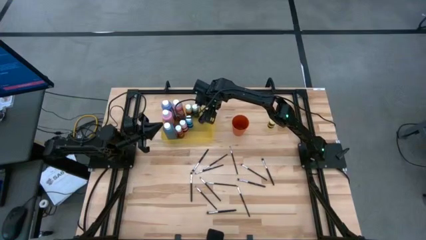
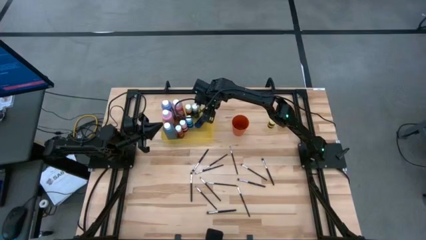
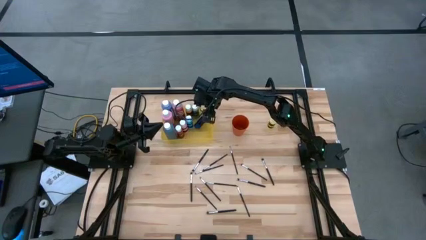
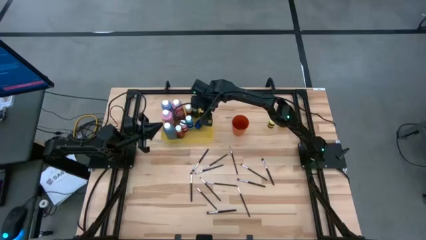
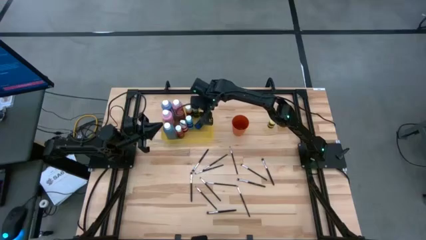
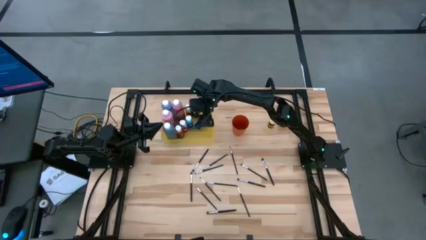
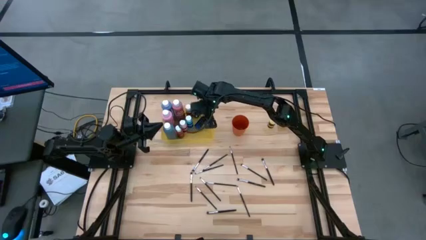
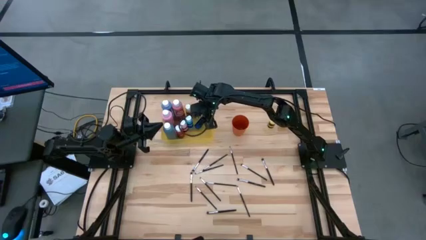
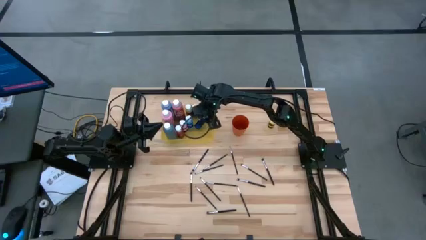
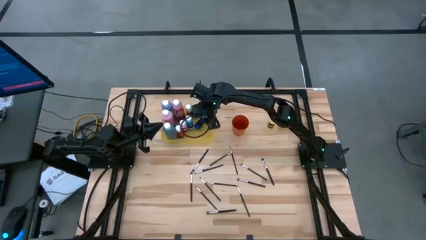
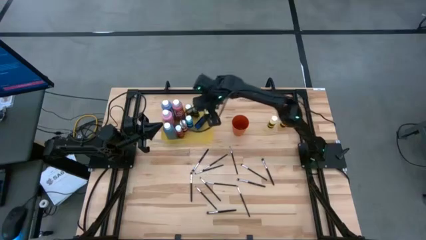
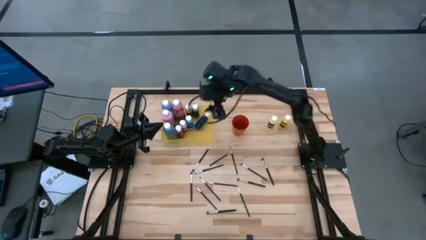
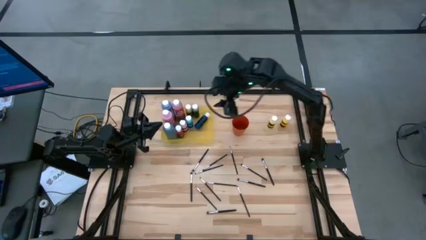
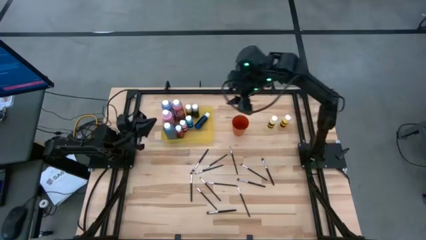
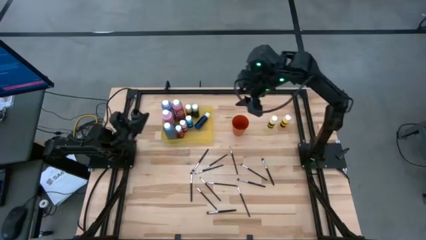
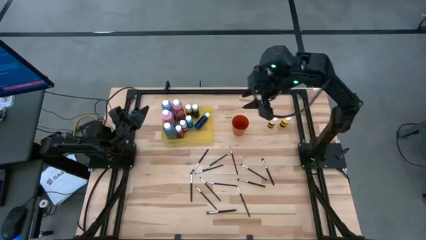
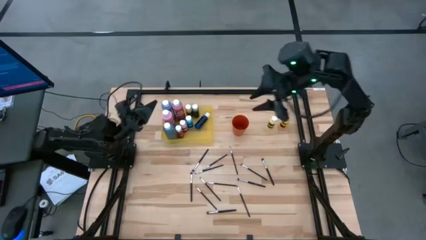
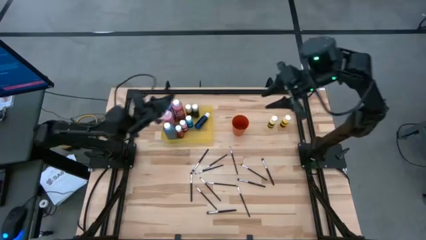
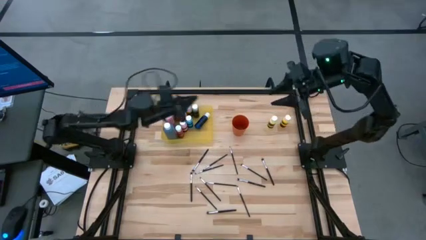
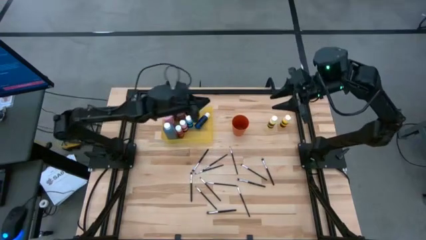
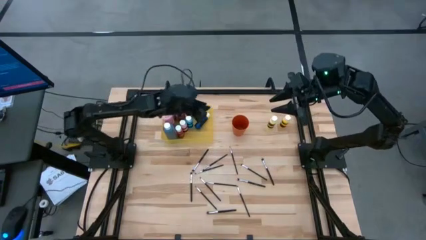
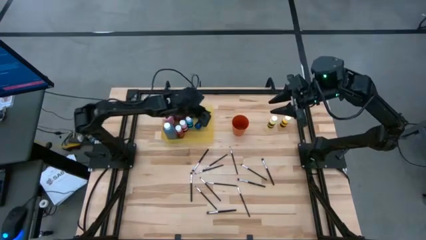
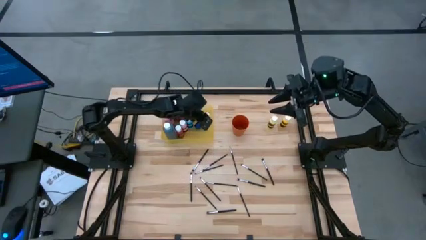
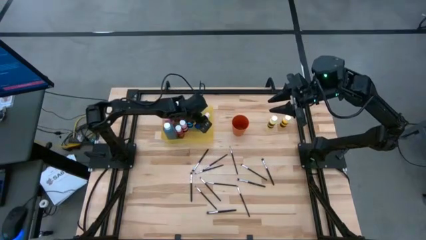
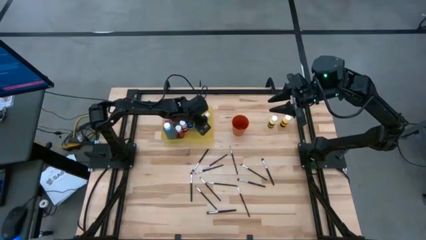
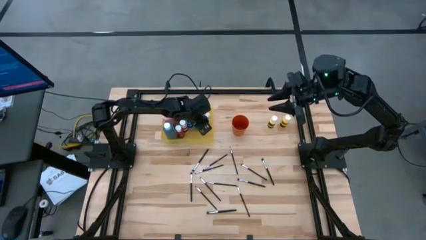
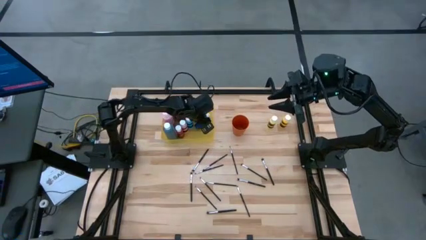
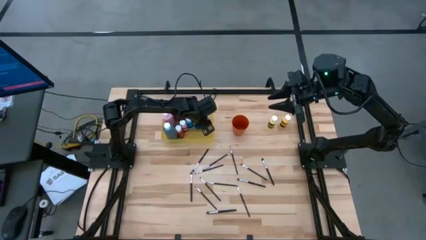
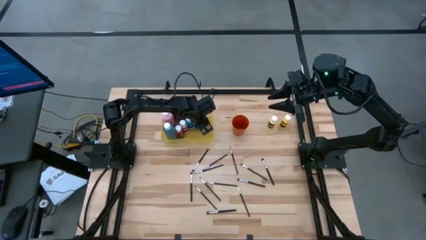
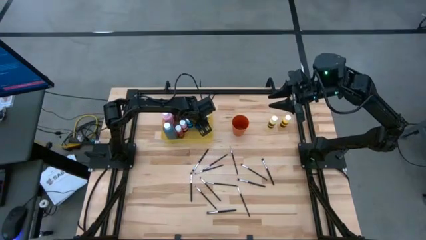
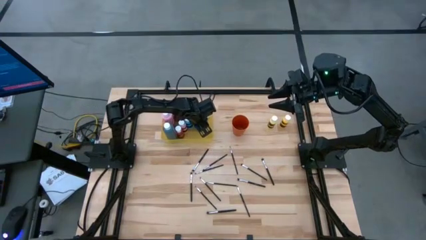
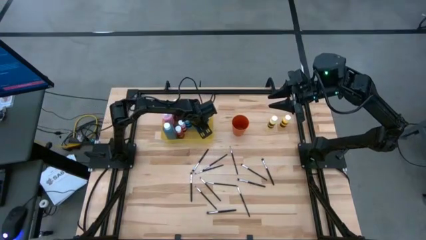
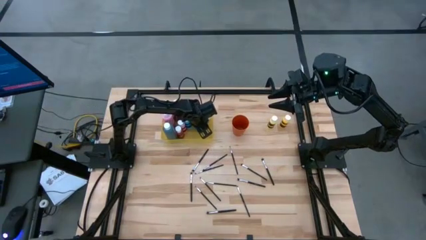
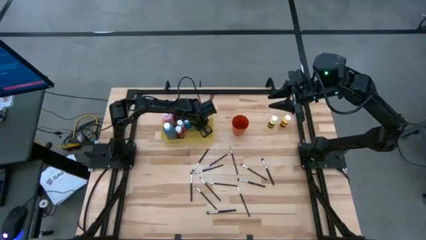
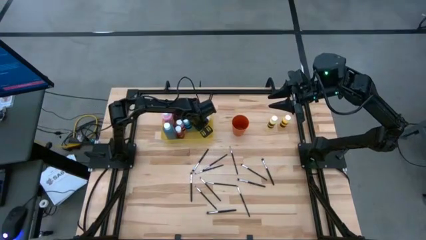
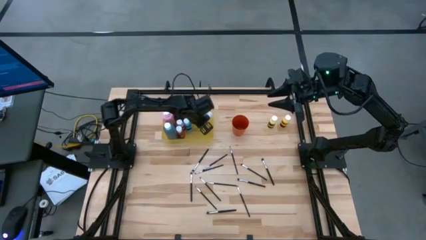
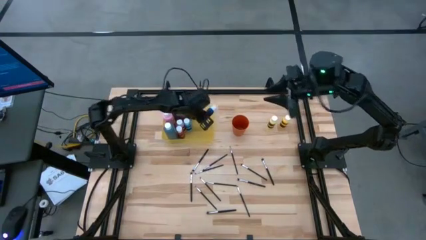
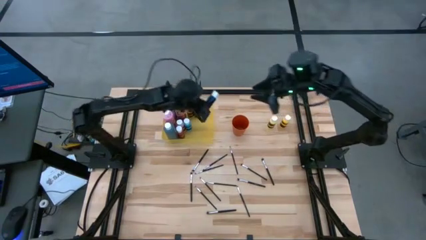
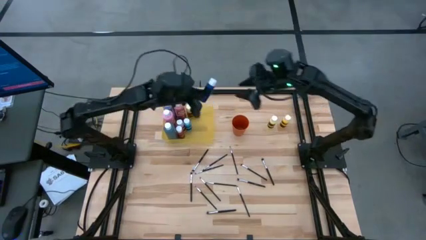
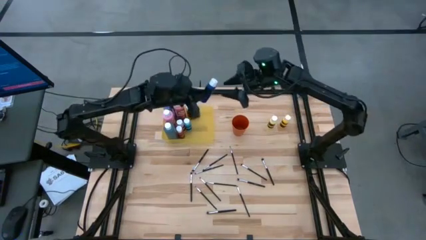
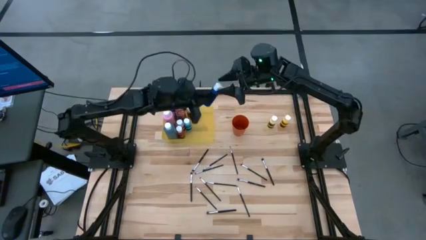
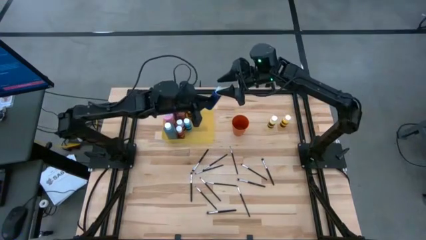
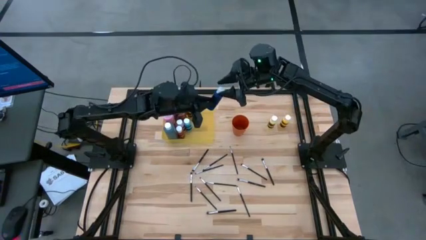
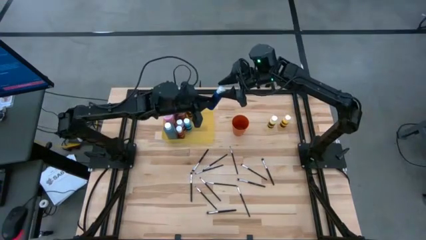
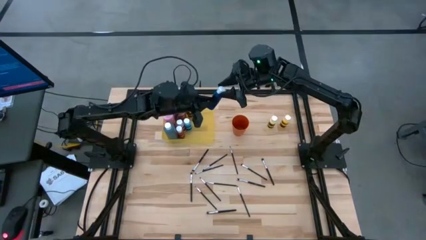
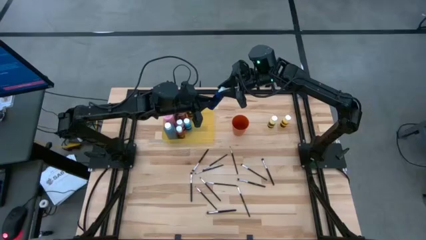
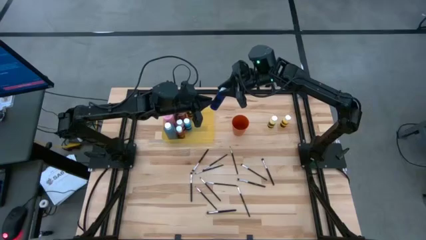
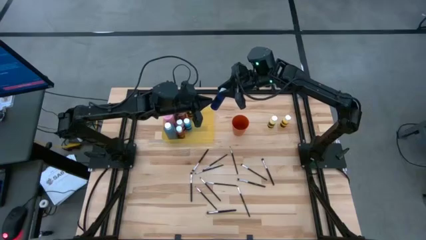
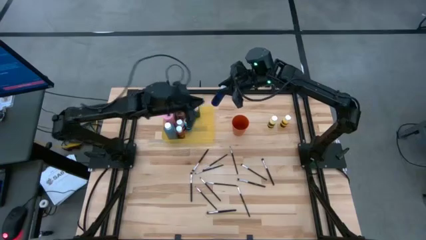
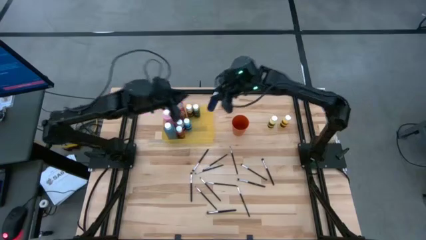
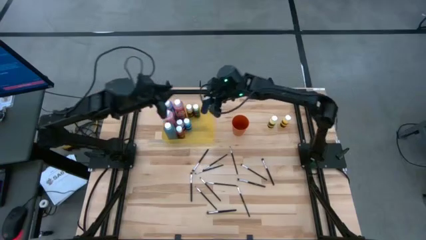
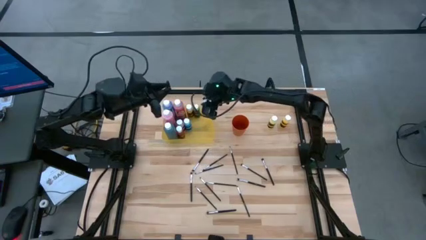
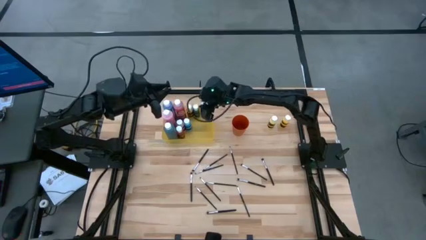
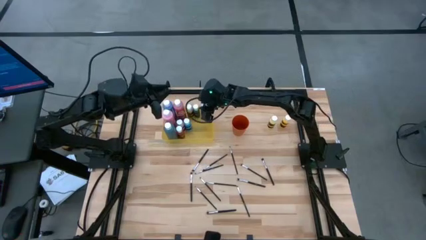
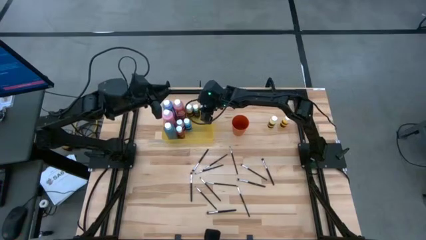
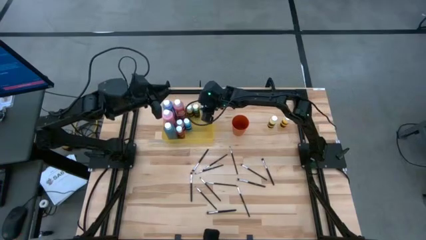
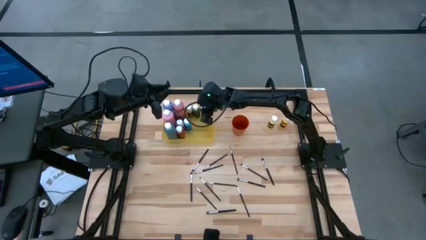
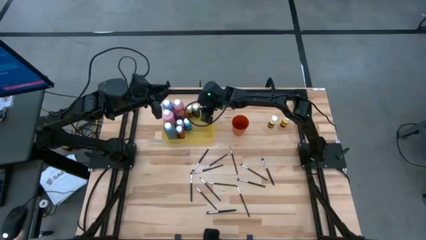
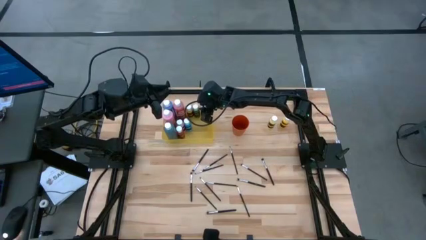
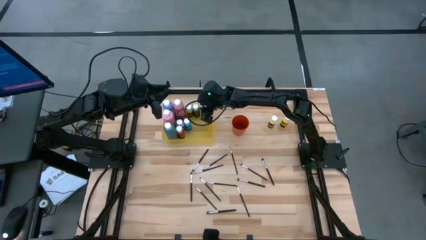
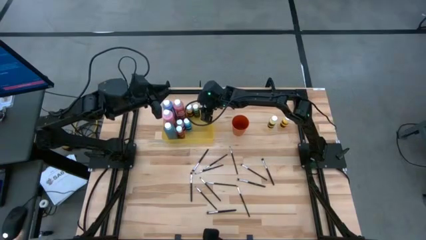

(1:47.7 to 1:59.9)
Task: Pick & Place Paint Supplies
Put the dark blue paint bottle into the yellow bin

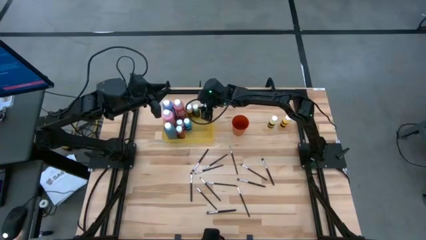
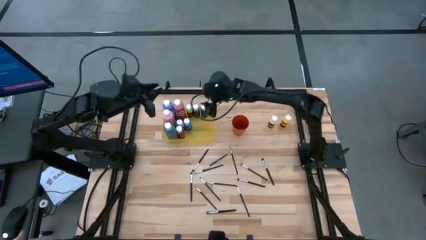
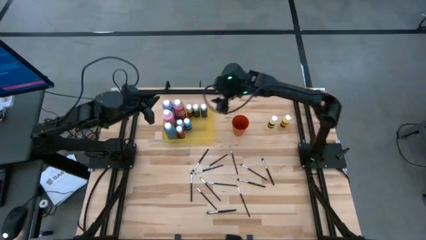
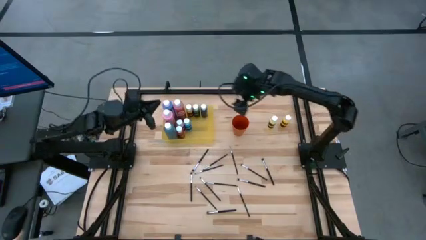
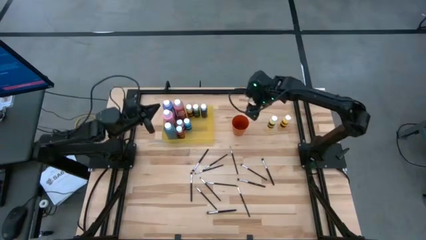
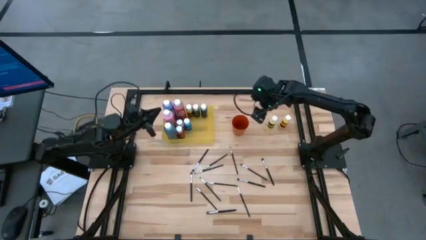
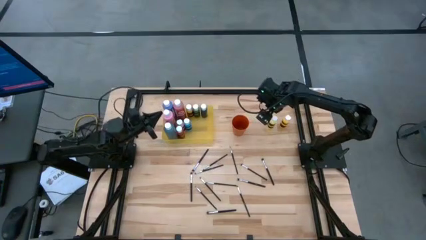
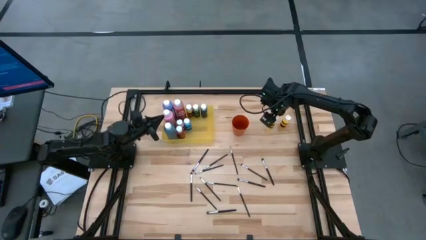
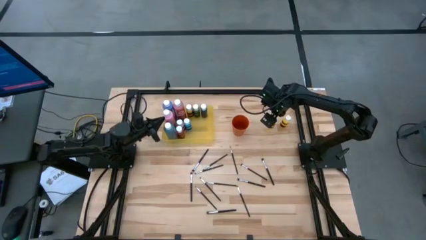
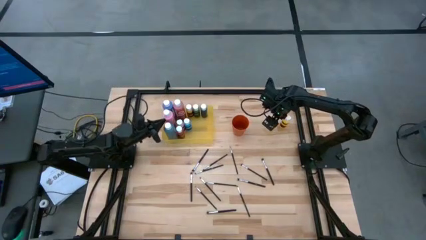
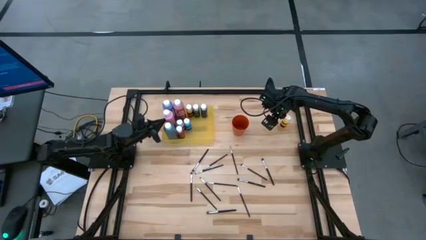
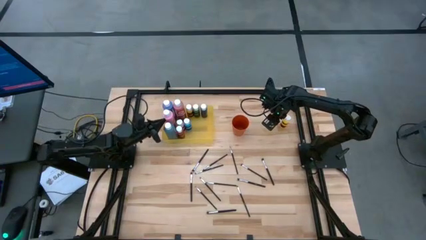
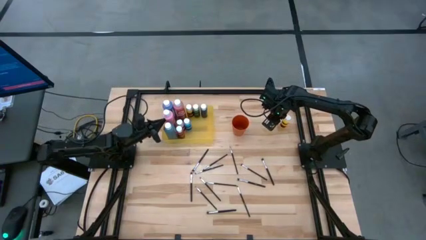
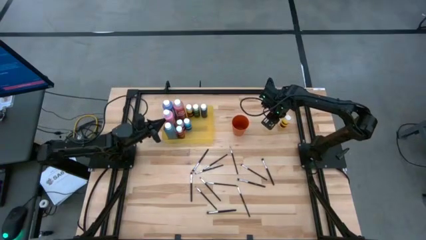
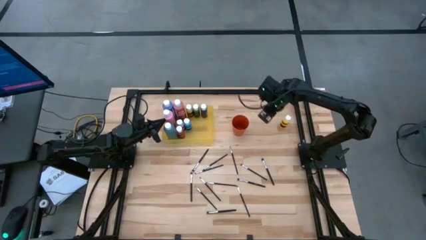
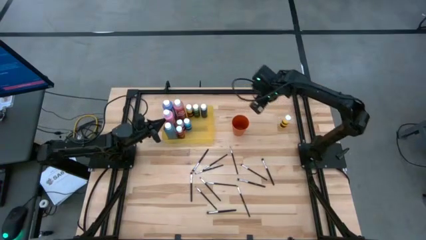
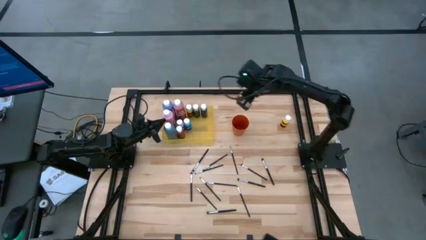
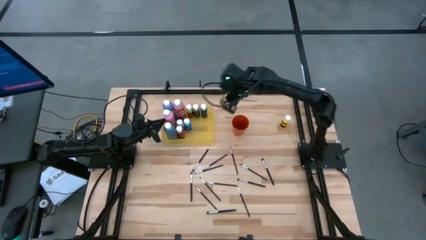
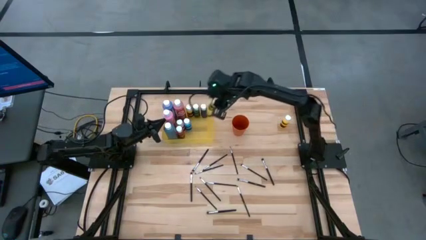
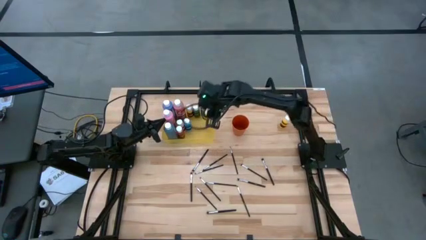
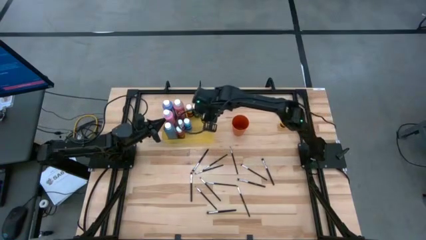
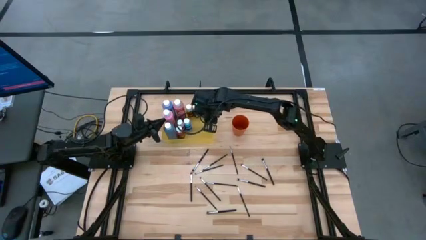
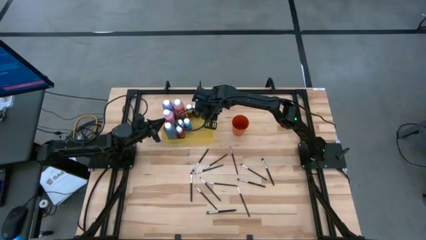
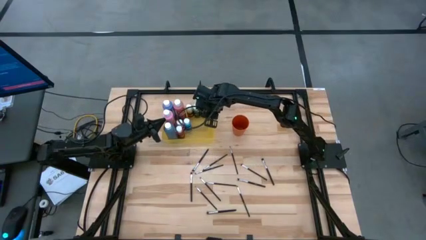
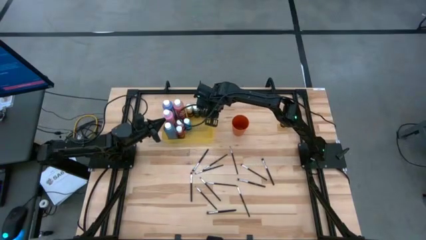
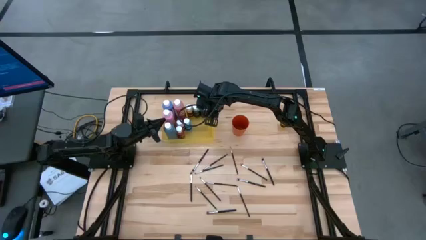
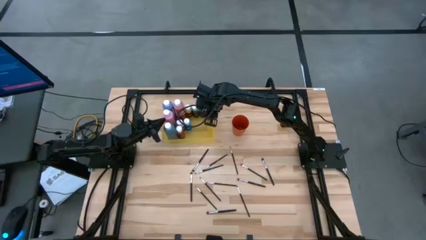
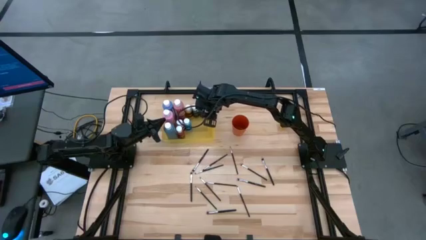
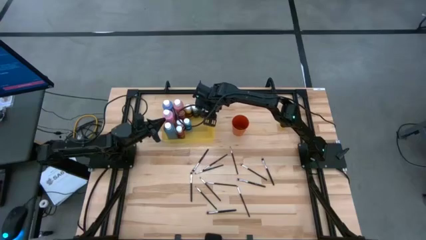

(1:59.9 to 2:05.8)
Put the light yellow paint bottle into the yellow bin
